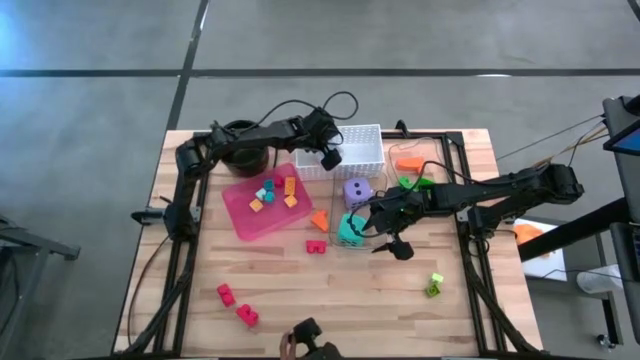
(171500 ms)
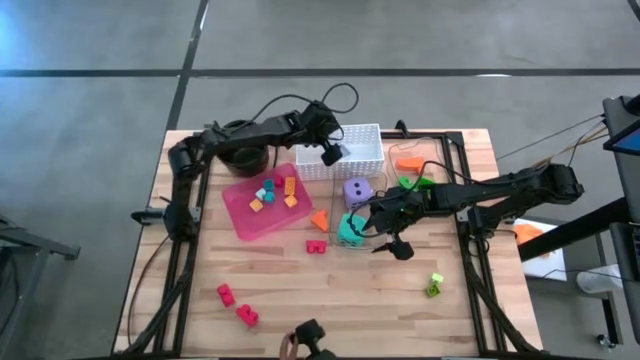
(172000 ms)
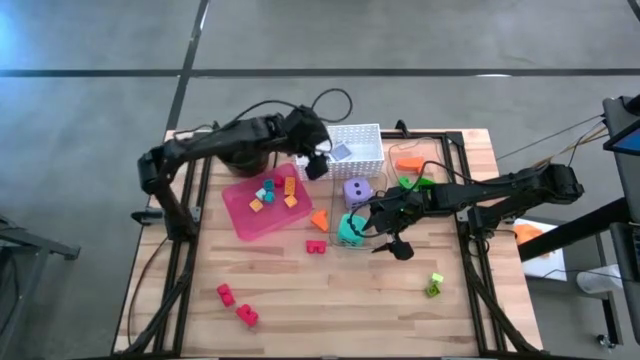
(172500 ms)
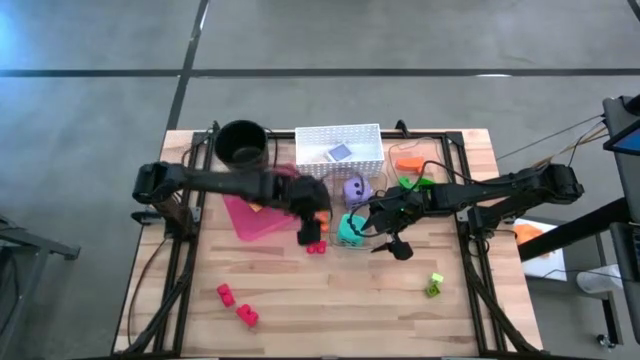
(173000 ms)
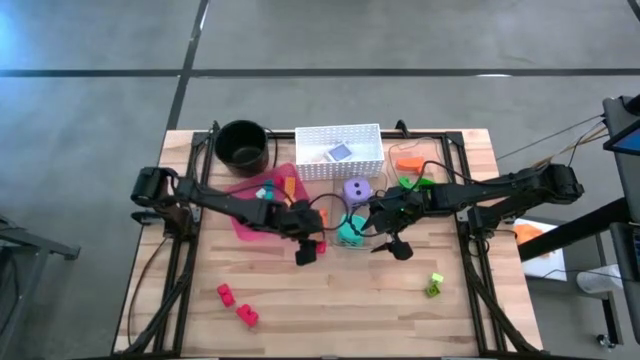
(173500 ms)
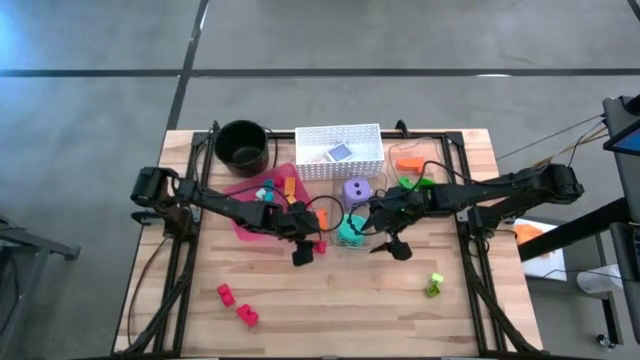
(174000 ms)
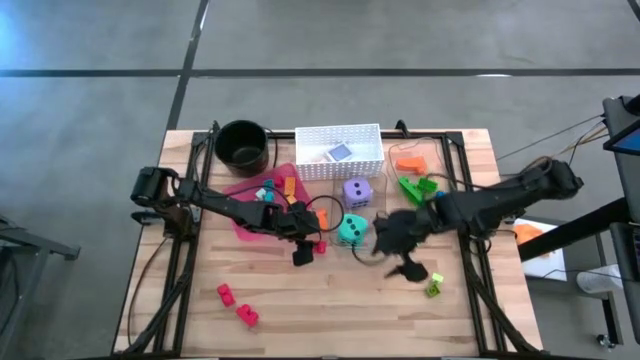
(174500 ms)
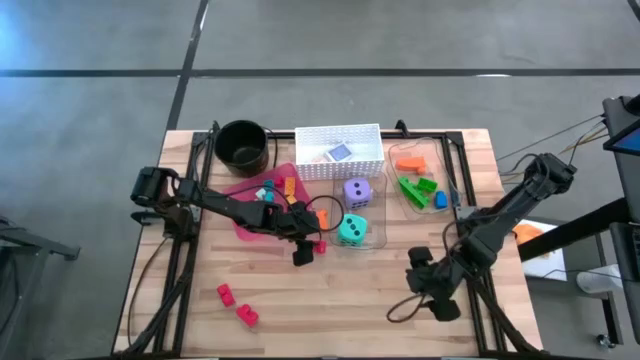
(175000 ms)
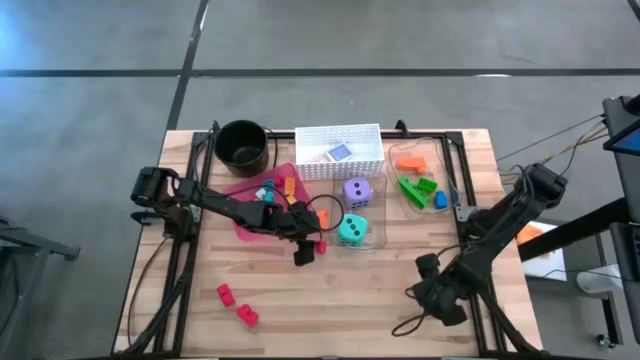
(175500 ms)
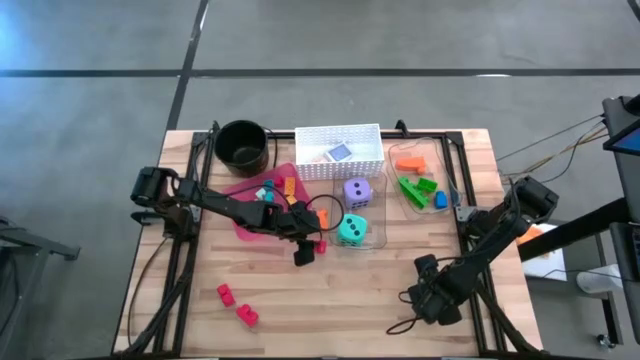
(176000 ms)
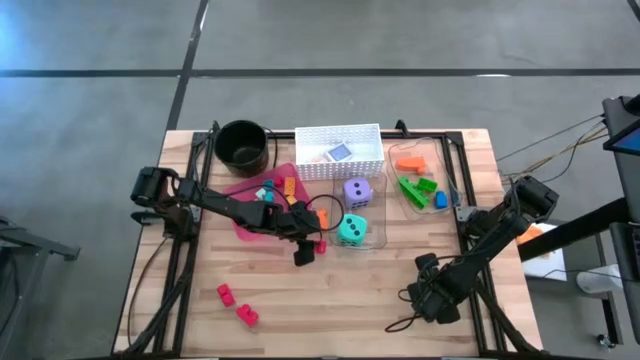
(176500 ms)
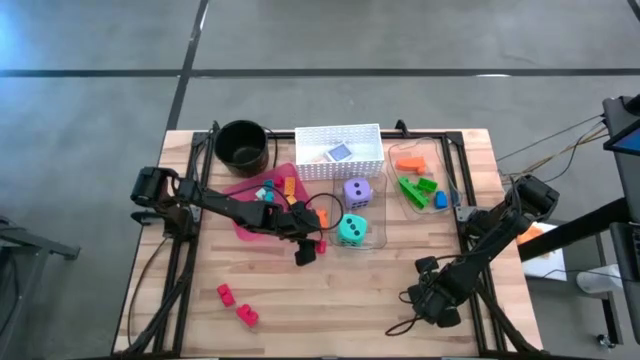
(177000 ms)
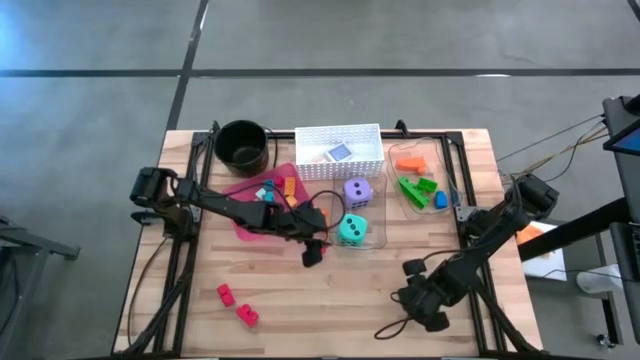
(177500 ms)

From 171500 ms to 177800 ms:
Task: Pick & Place Toys
Put the small green game piece into the red bin

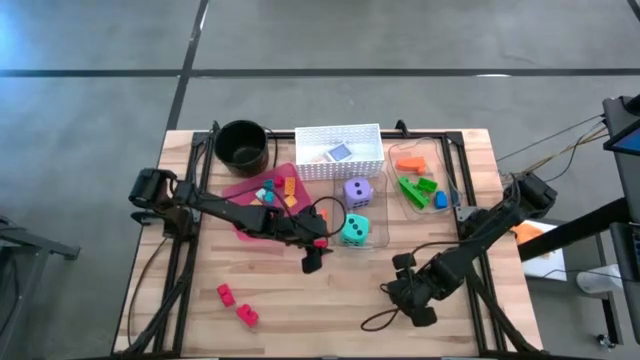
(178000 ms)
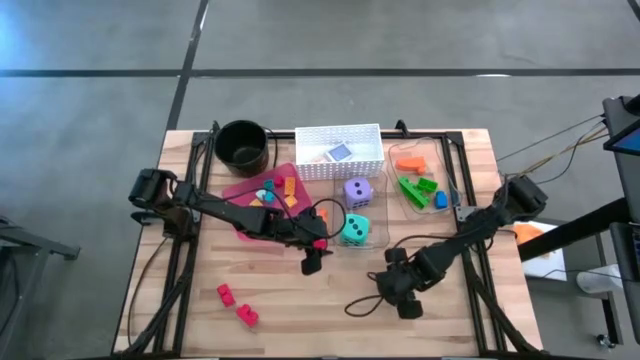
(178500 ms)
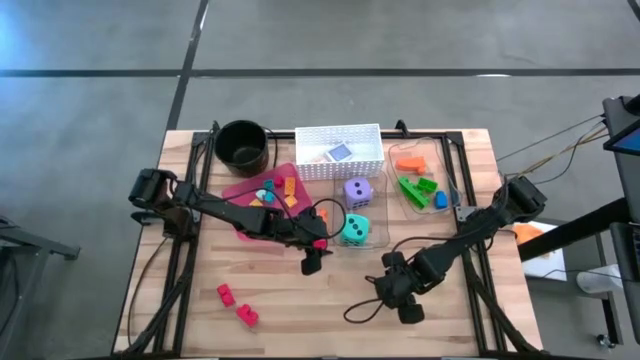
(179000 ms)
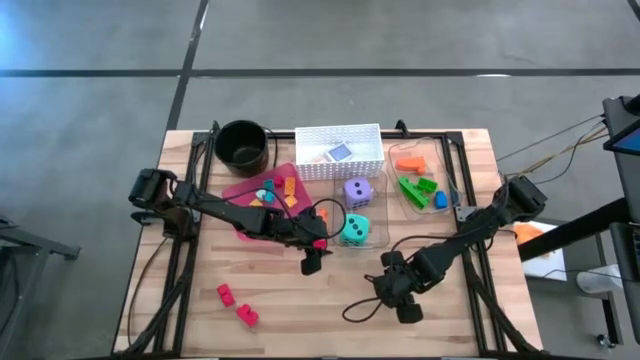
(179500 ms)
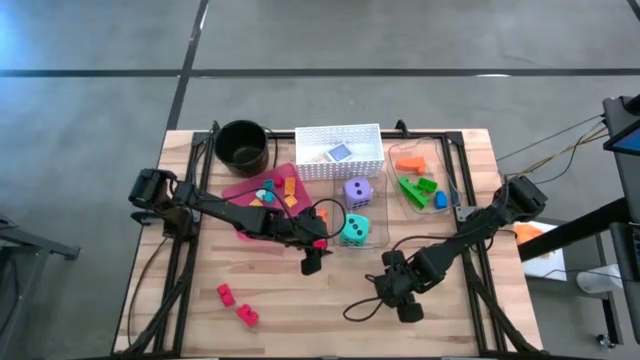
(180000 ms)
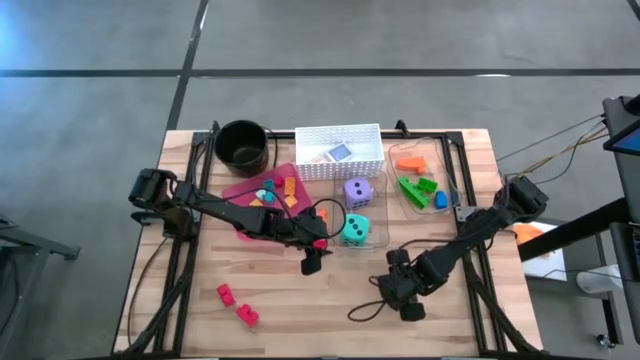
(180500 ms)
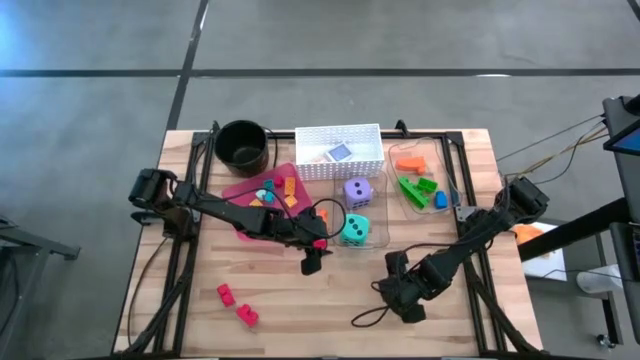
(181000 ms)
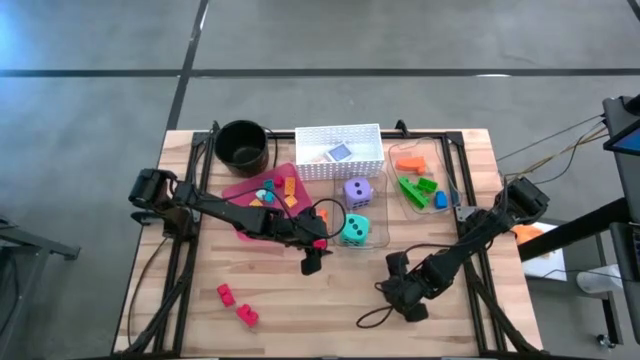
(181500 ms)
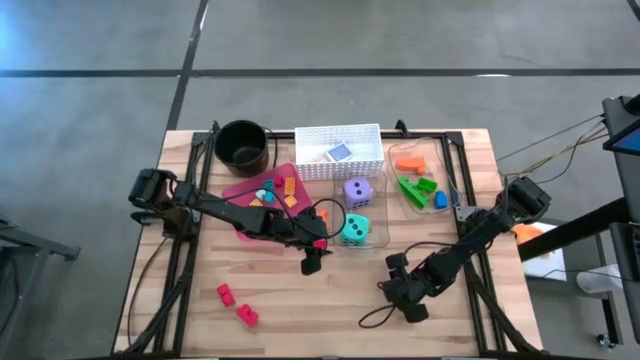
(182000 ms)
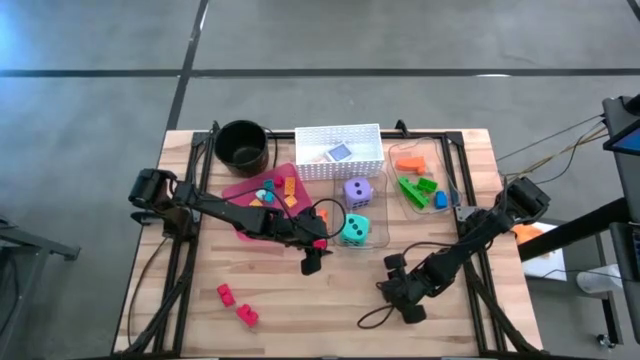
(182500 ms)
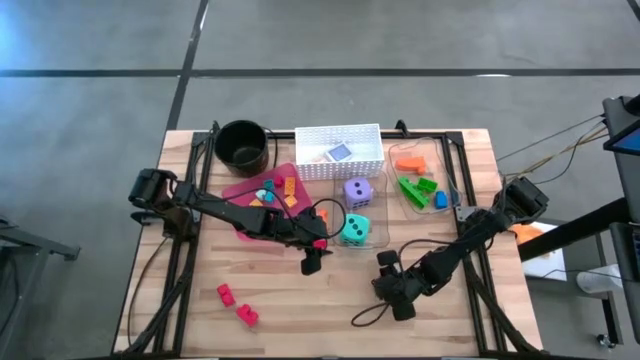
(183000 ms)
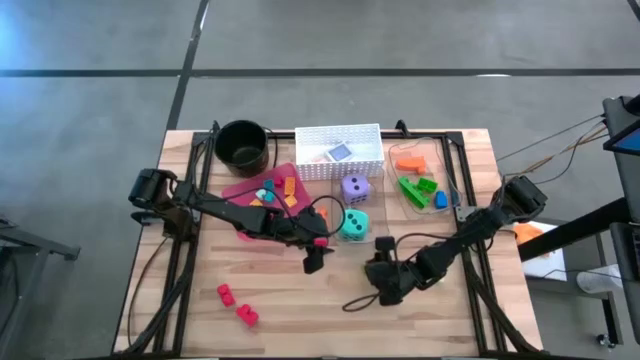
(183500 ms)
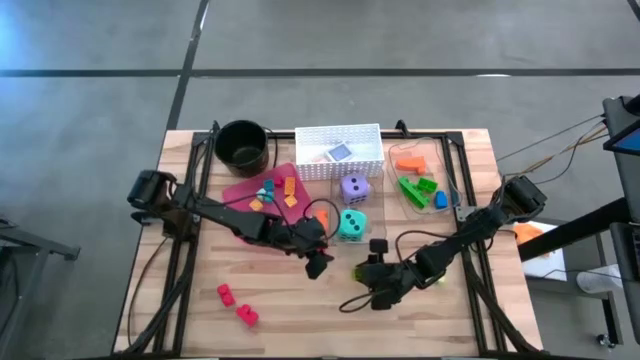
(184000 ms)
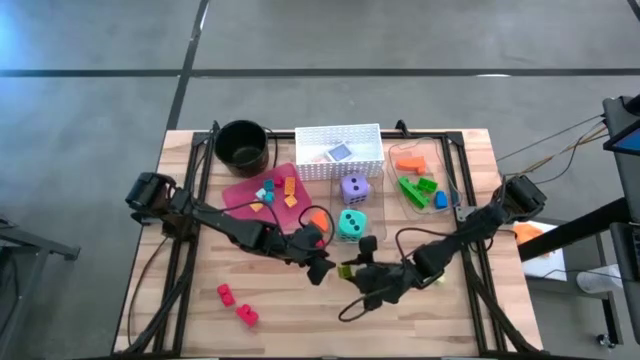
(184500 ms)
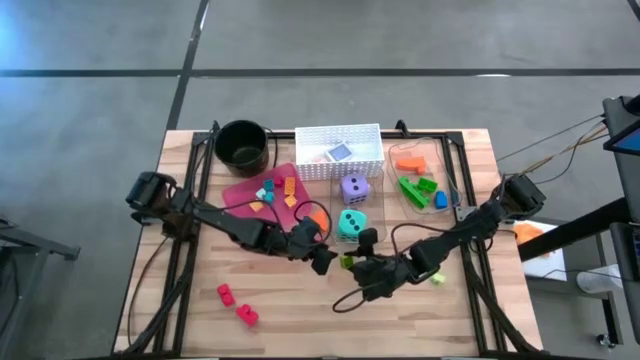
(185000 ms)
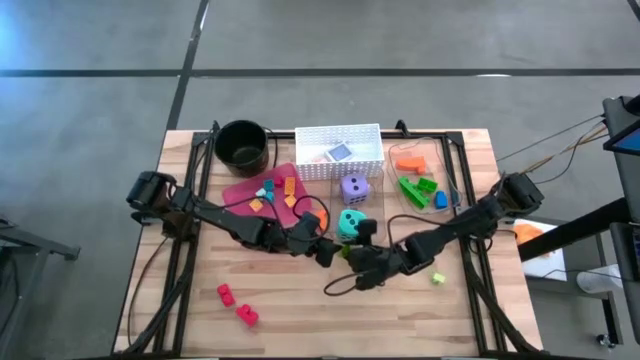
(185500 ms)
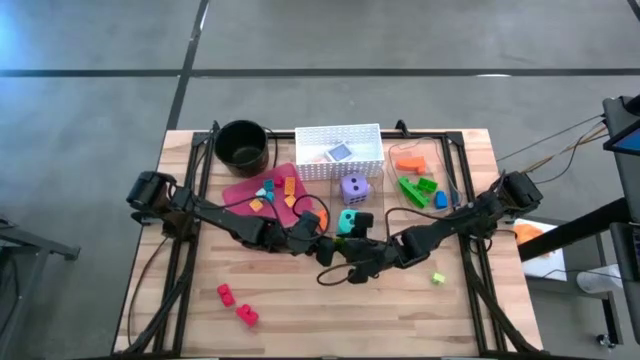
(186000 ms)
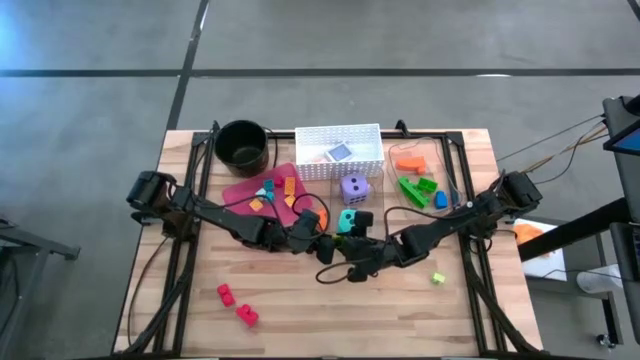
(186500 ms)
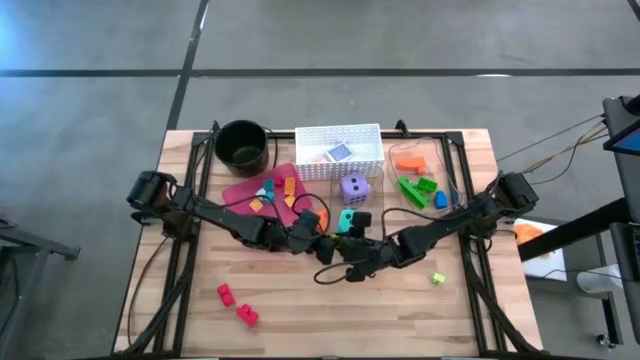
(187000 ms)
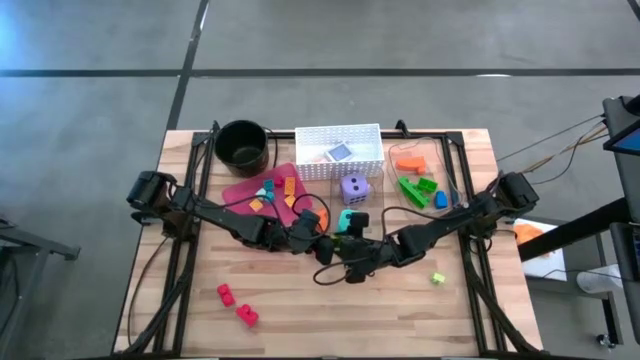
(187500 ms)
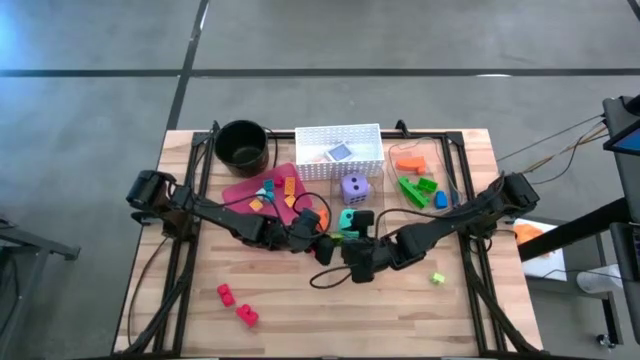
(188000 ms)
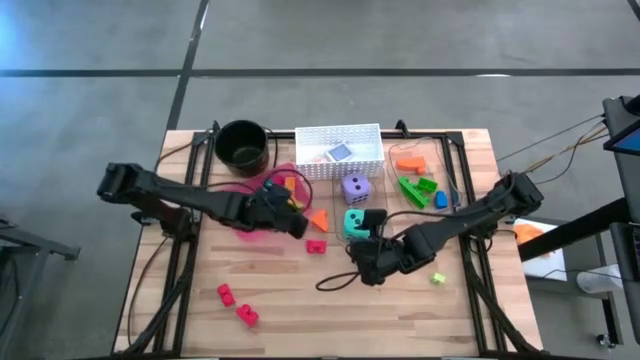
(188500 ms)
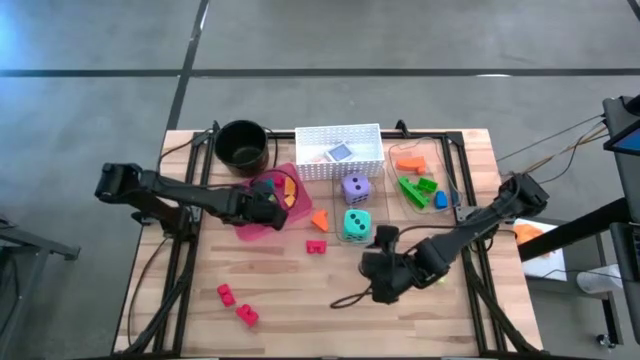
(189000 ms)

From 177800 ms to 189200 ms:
Put the small green game piece into the red bin

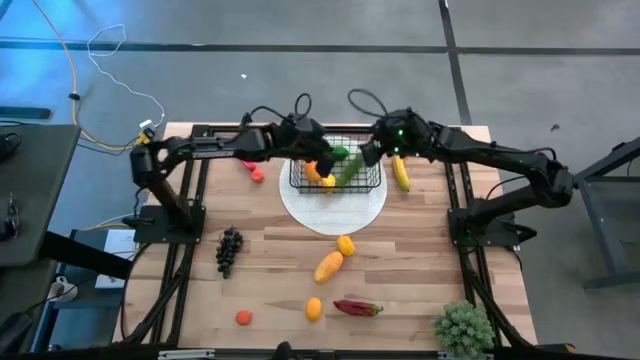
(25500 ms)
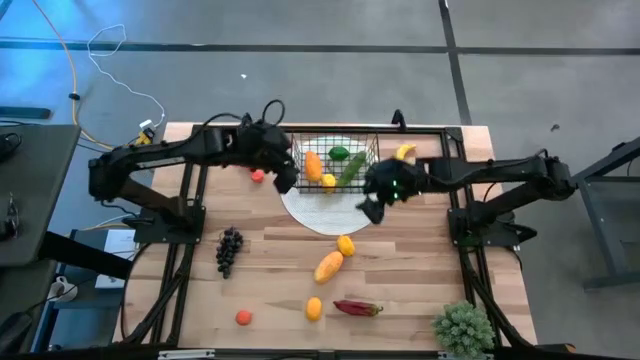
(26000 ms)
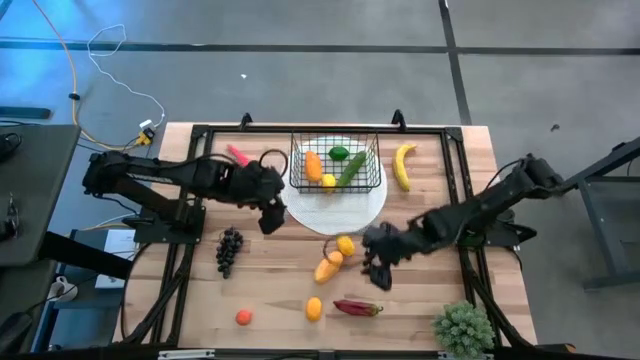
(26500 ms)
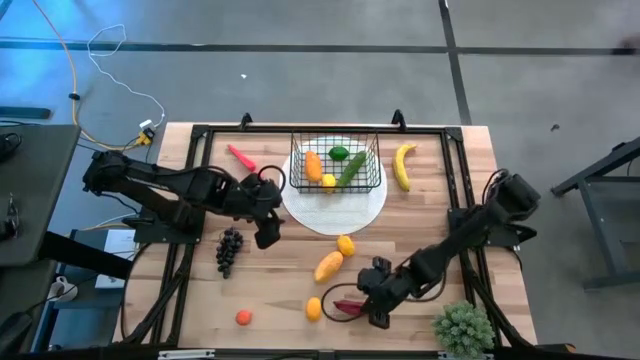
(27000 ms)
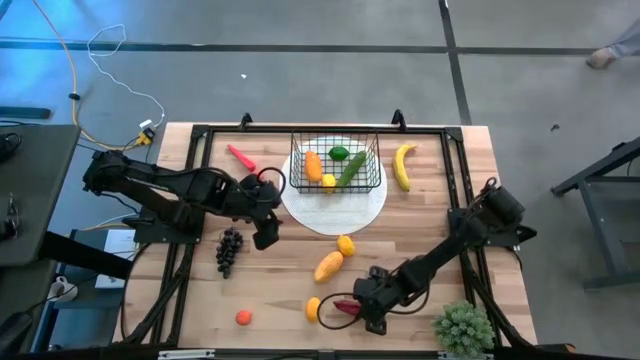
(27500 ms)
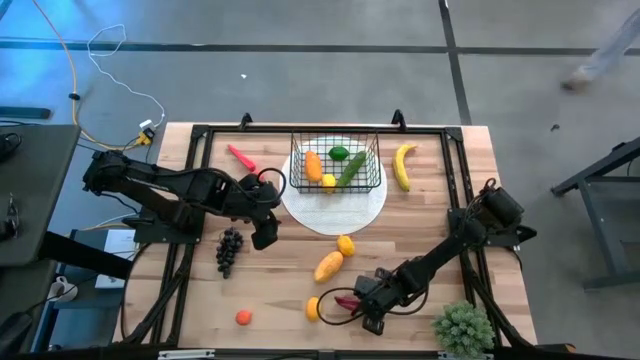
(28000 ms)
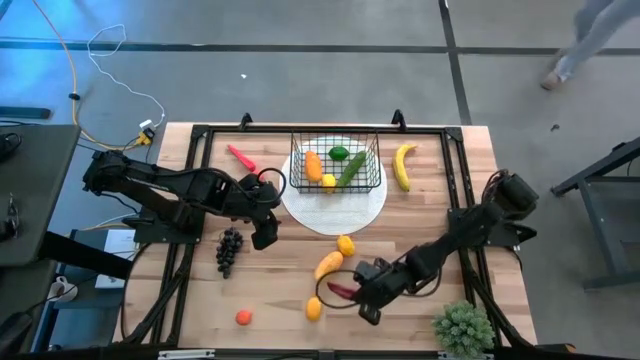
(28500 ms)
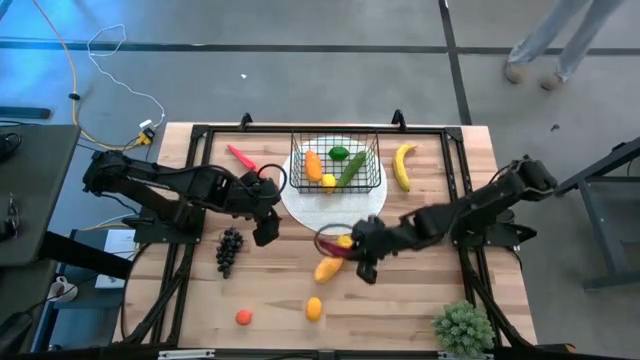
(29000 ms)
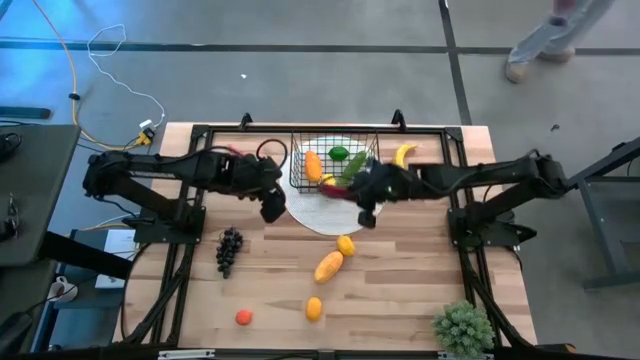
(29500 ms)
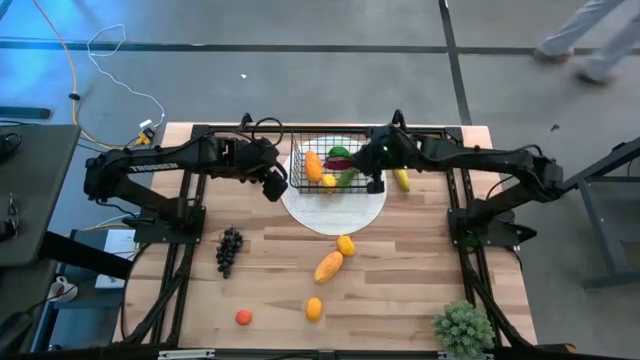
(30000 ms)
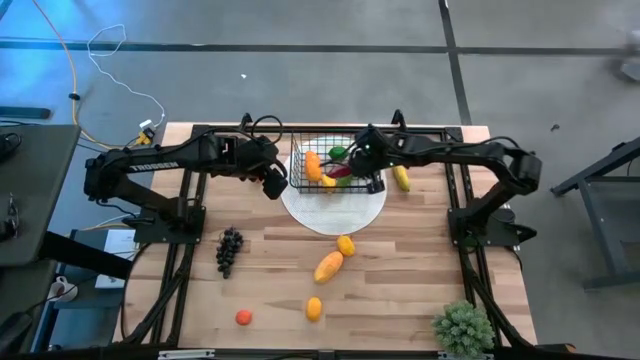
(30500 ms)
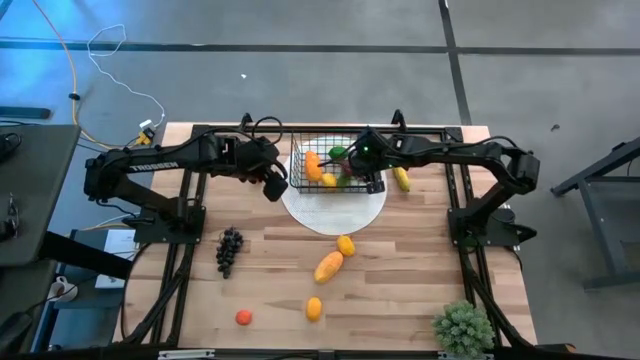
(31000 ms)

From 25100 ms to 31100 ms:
Task: Build produce basket
Put the red chili pepper into the black wire basket
